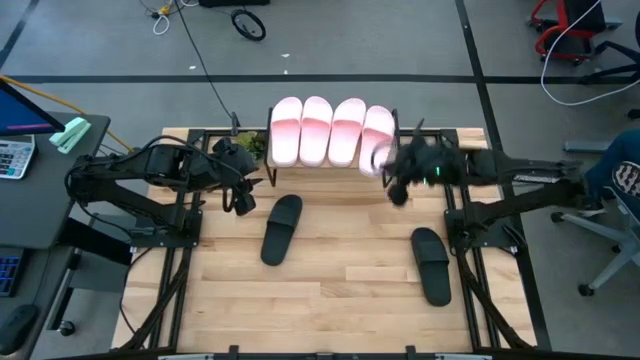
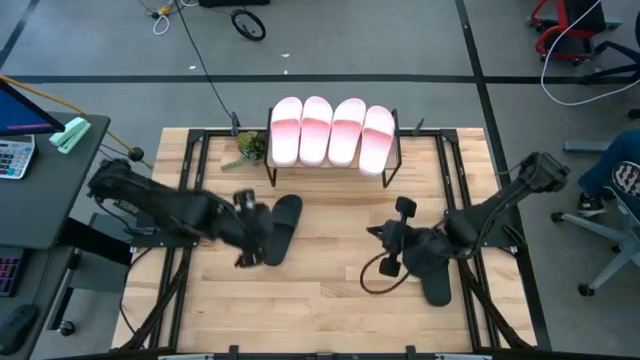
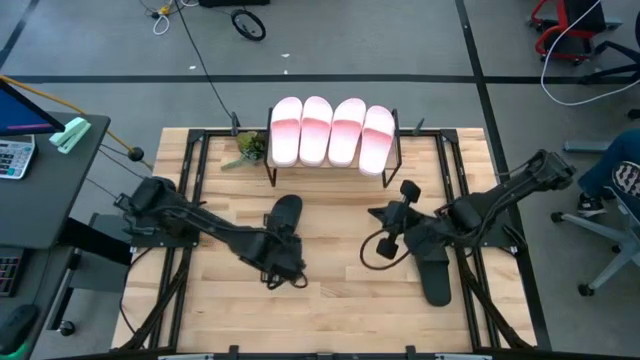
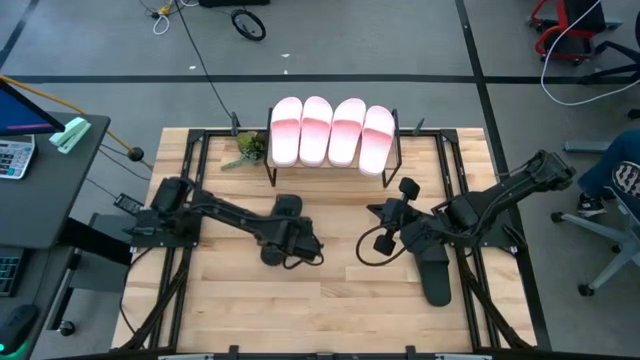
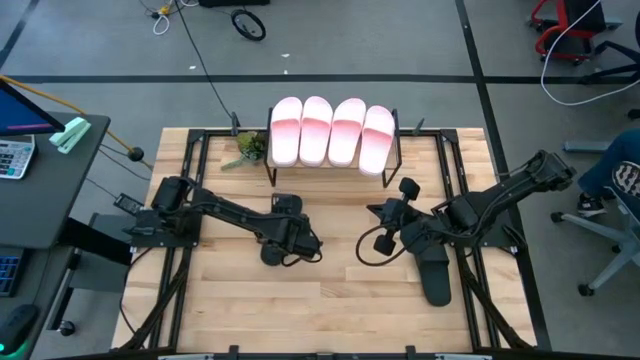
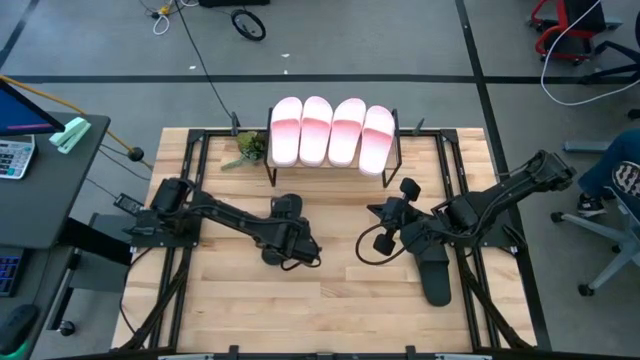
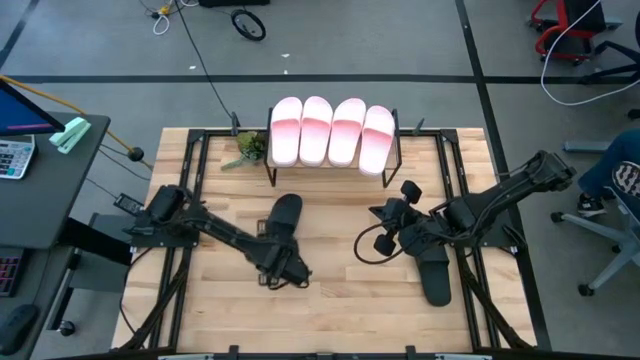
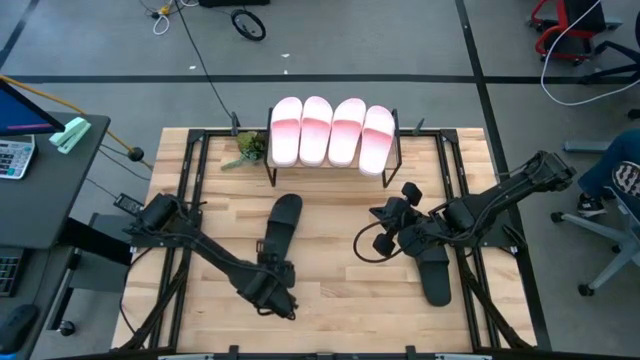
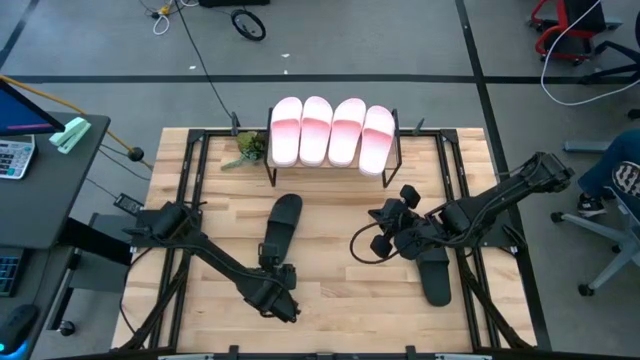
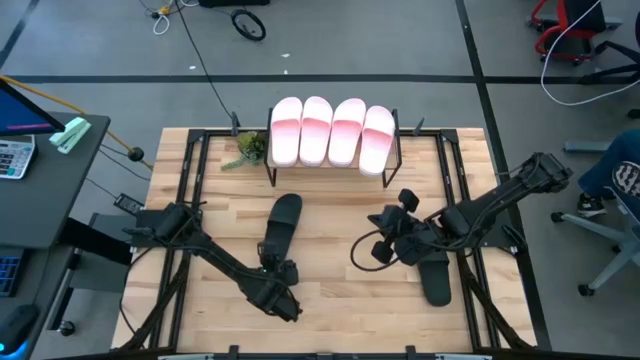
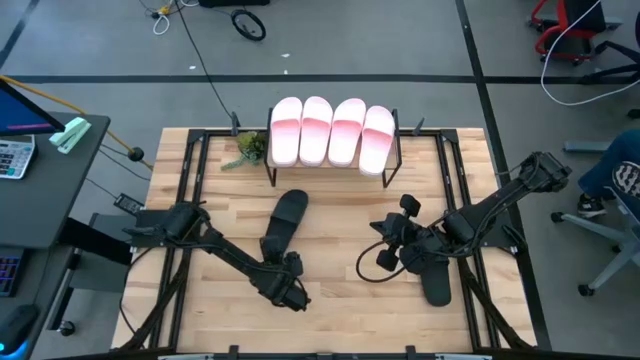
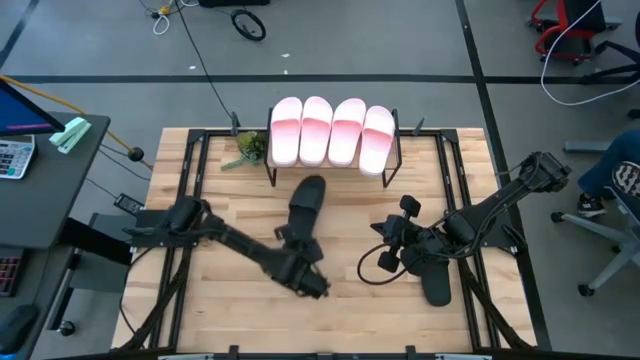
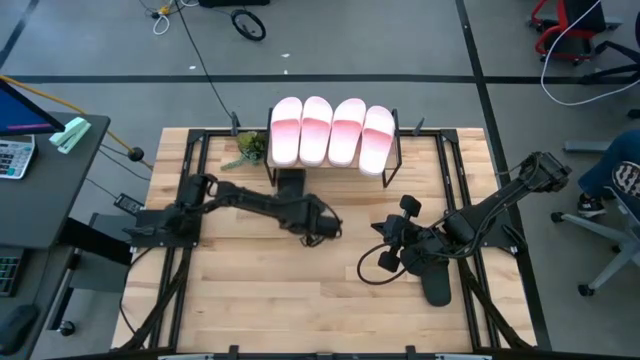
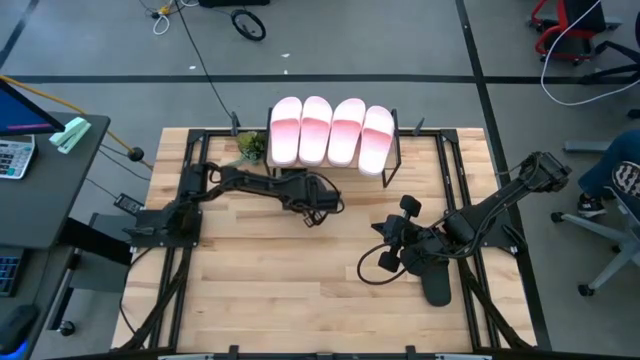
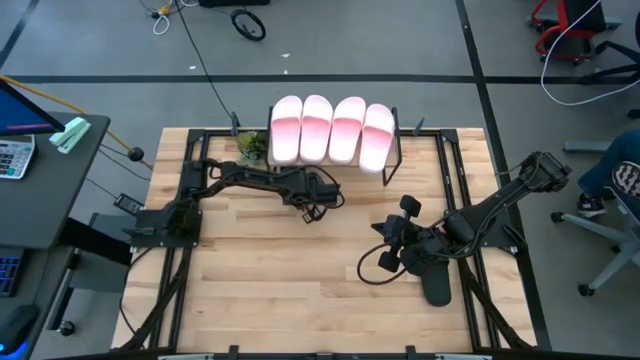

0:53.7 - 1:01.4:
Task: Pick and place slides into the shelf
Put the left black slide under the shelf

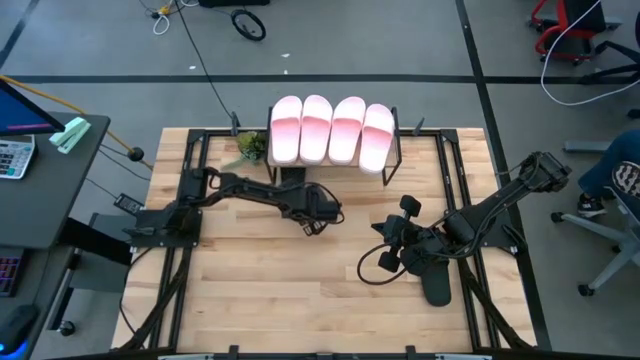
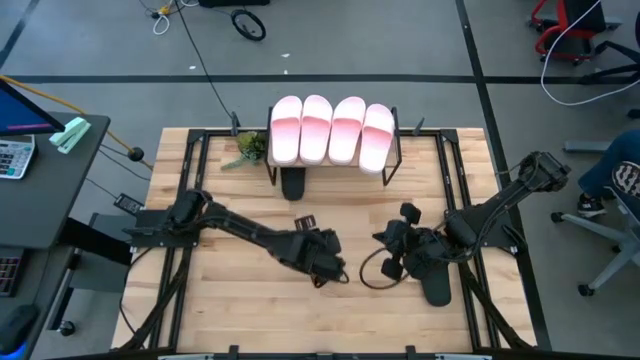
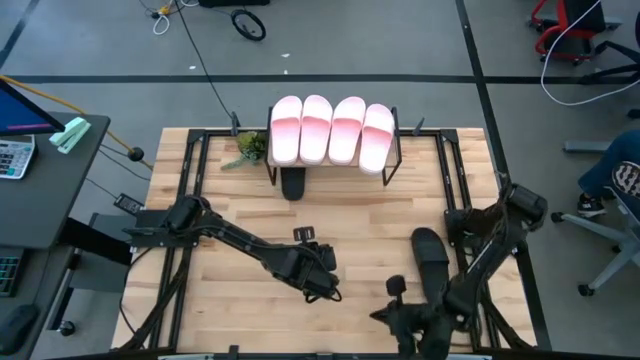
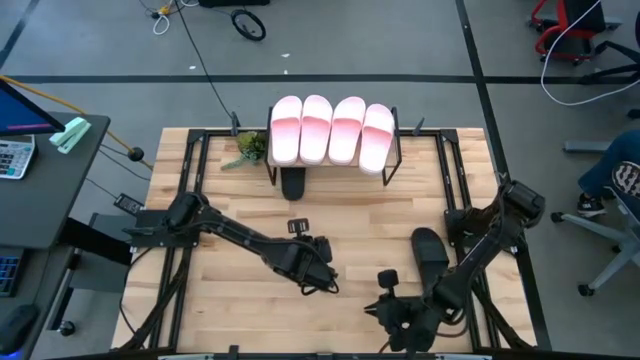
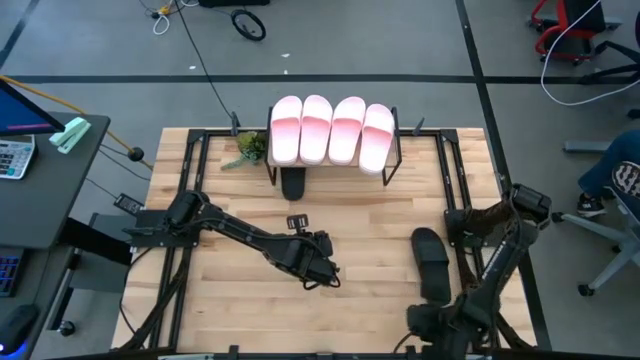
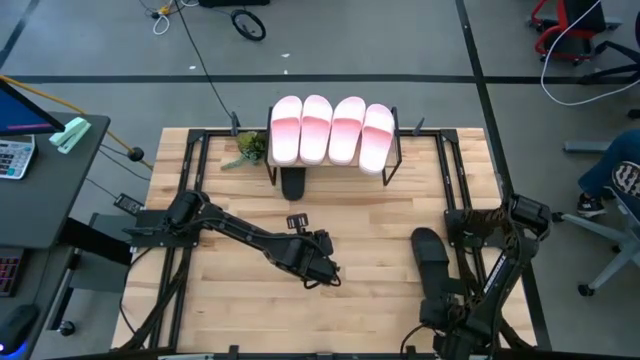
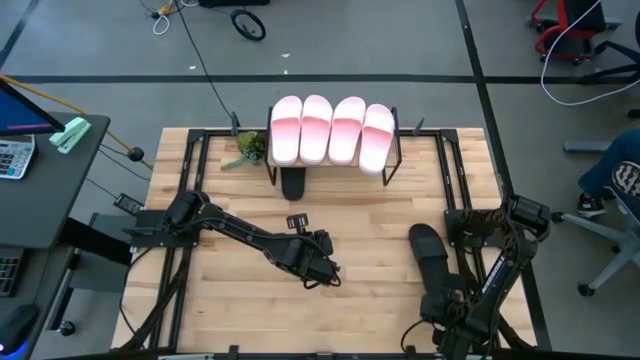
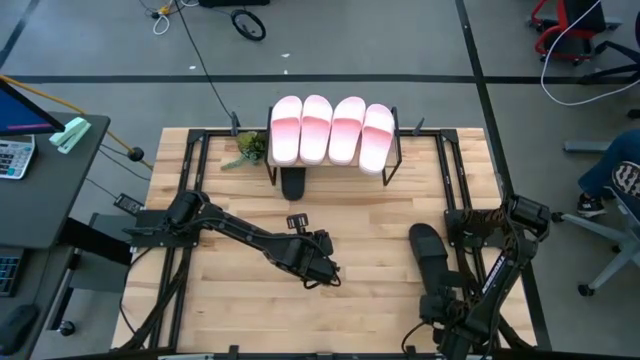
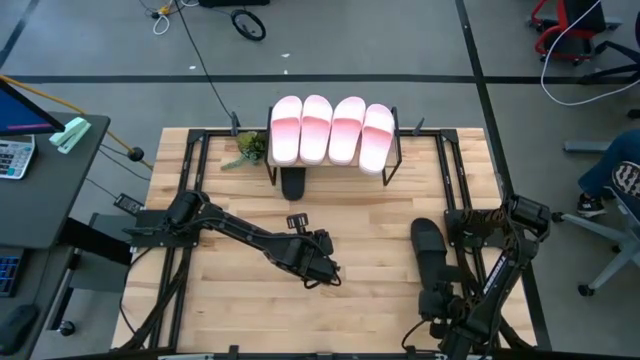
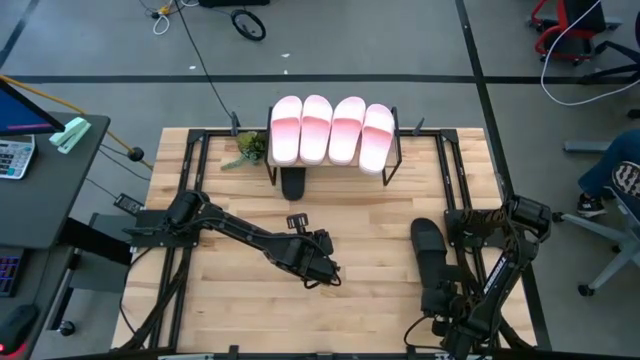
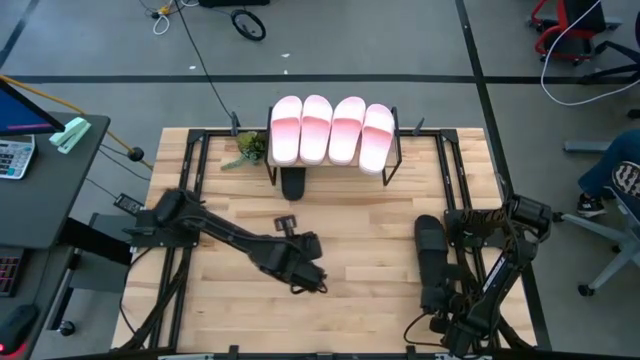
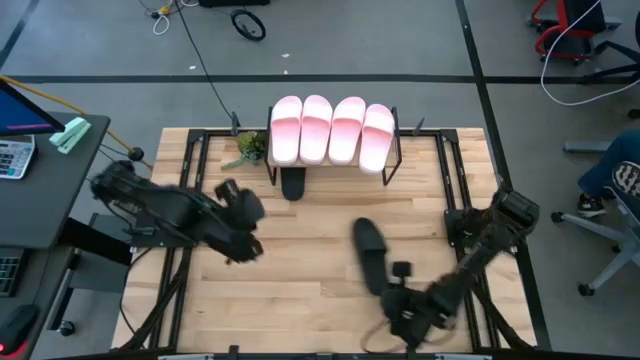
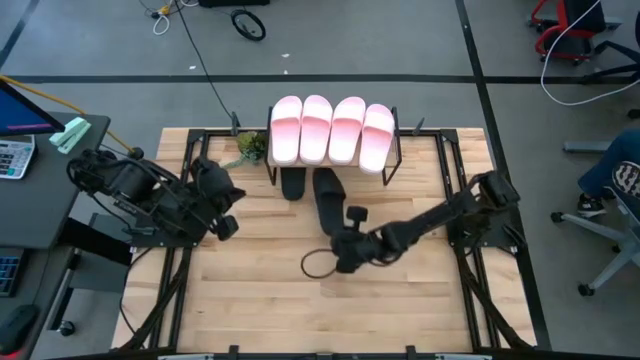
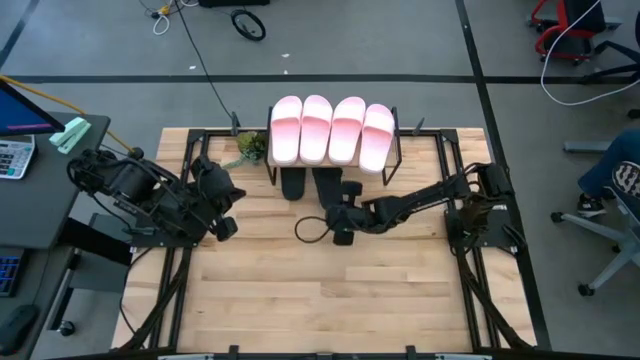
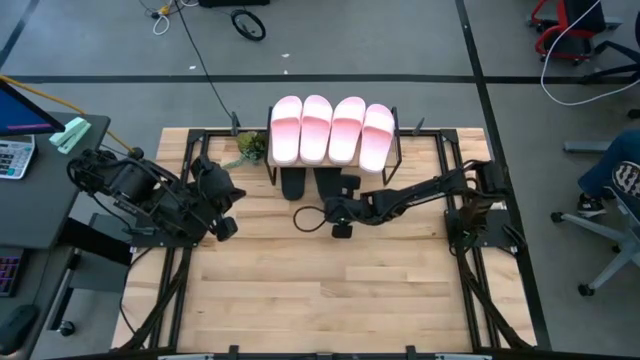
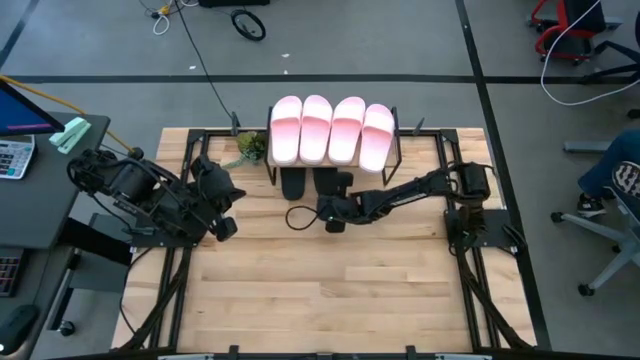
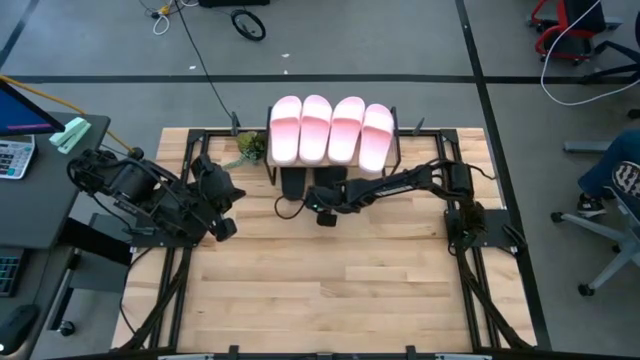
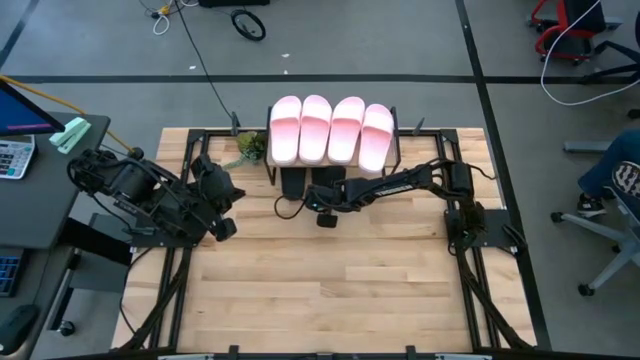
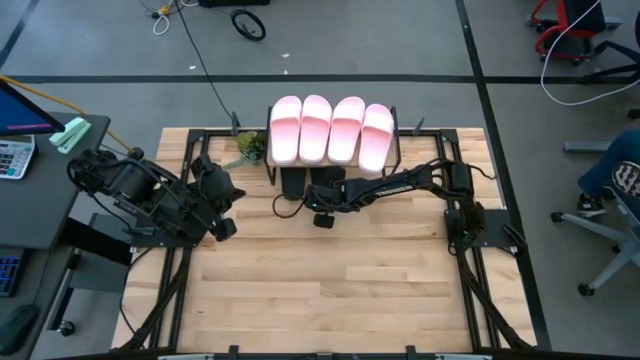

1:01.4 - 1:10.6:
Put the black slide under the shelf

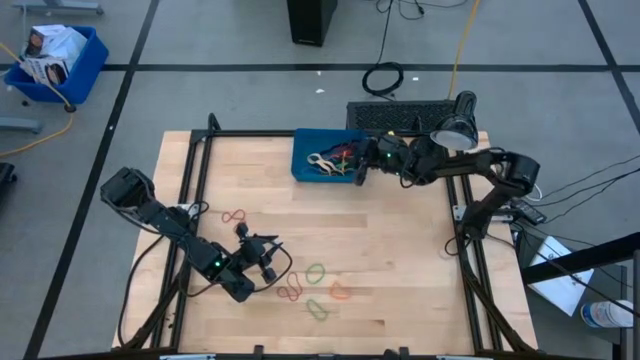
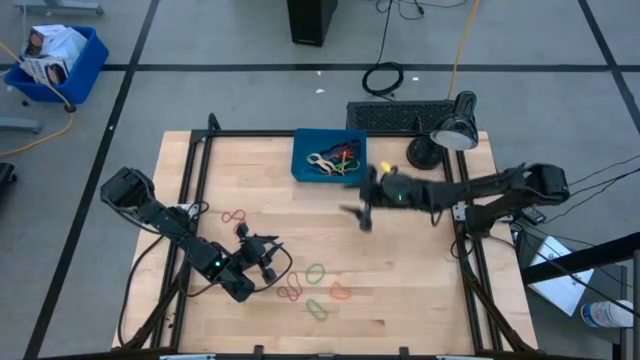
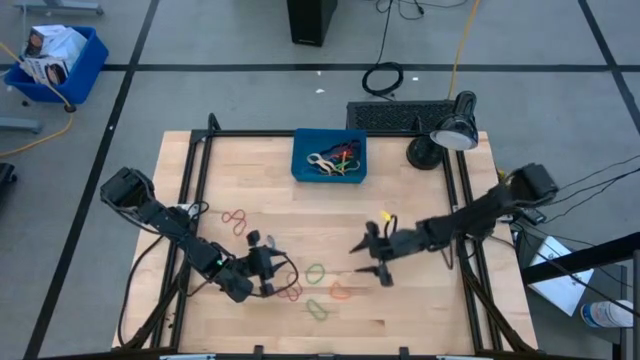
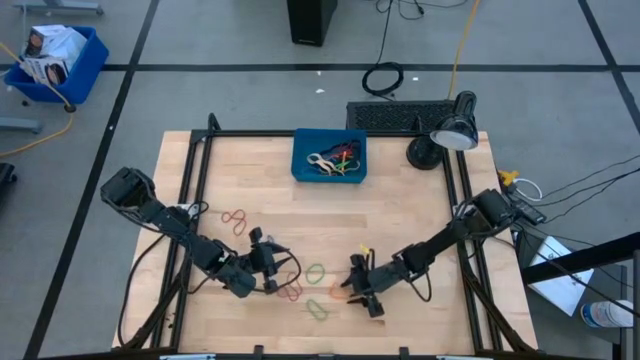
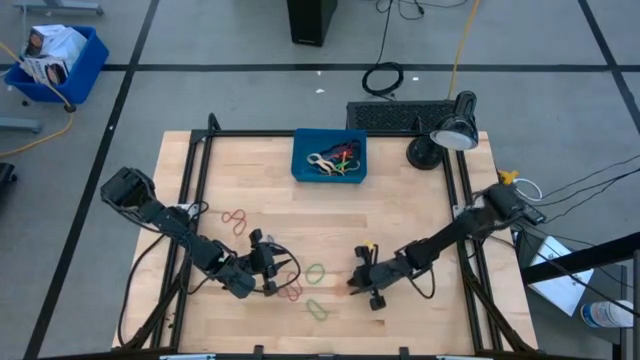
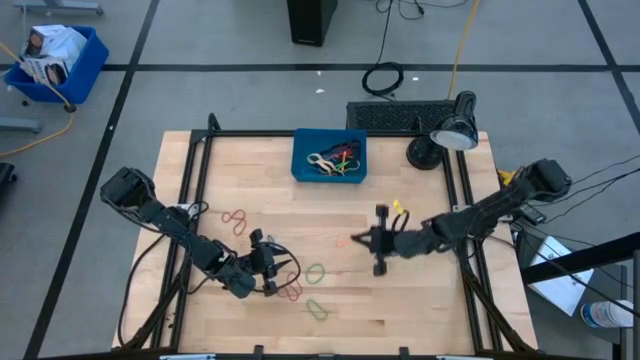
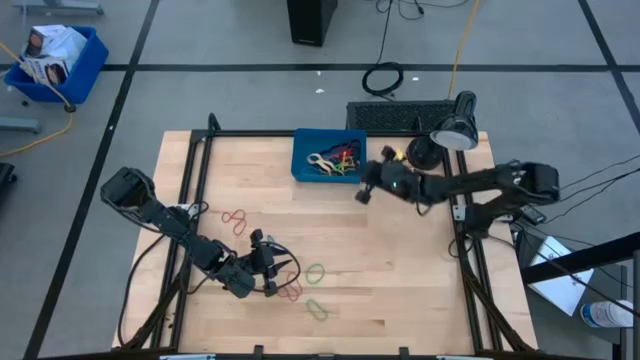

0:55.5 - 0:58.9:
Task: Pick and place rubber bands into bin
Put the orange rubber band into the blue bin

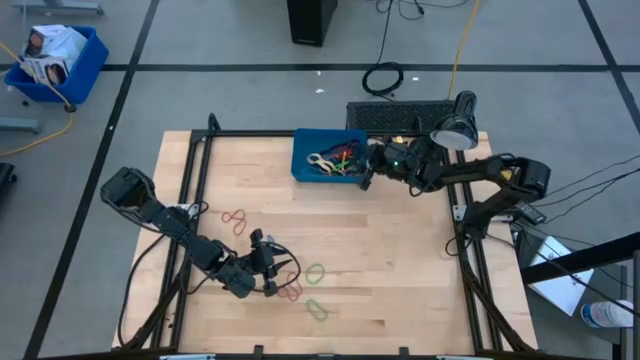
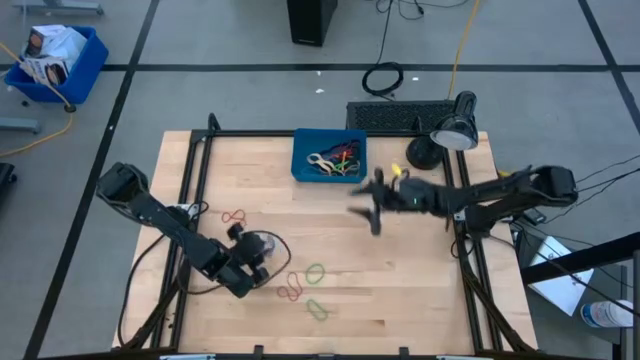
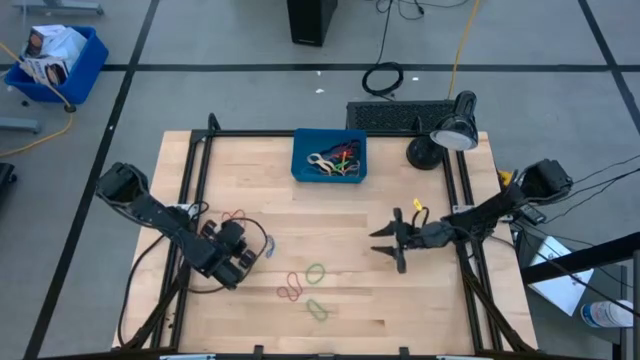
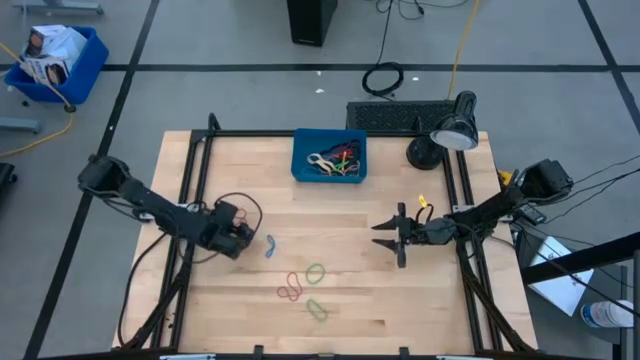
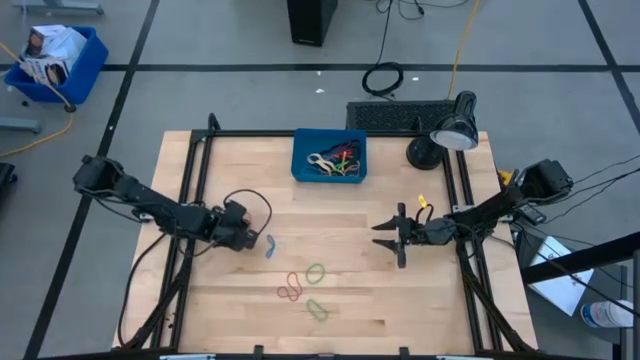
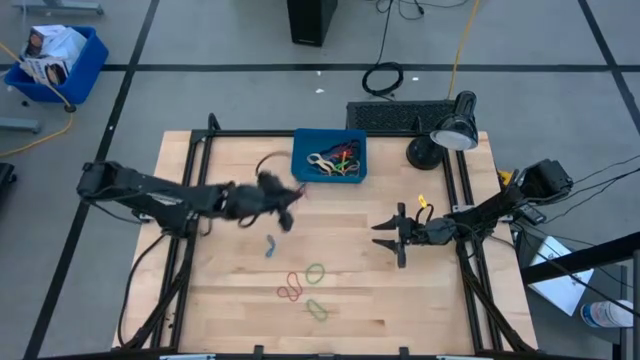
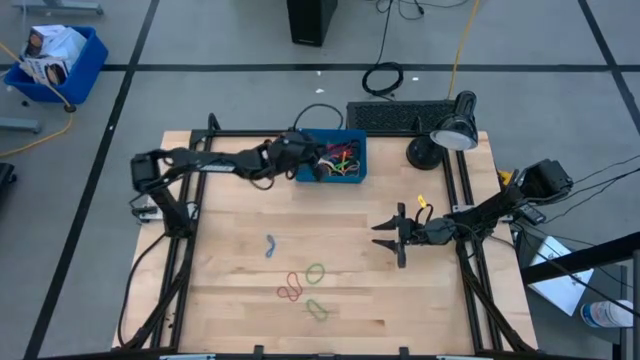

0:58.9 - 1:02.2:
Put the red rubber band into the blue bin
